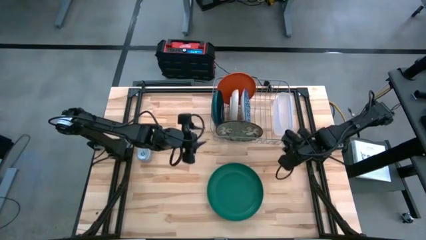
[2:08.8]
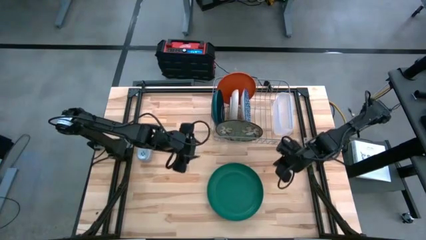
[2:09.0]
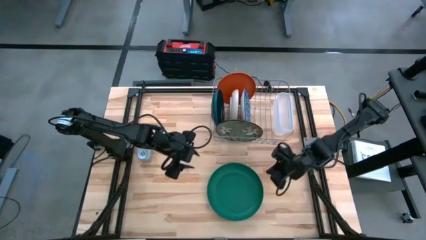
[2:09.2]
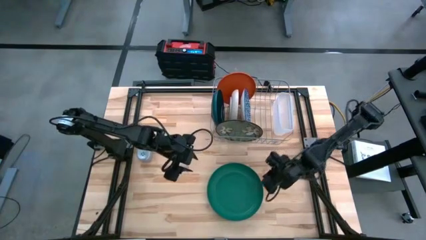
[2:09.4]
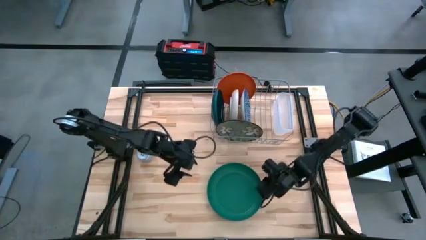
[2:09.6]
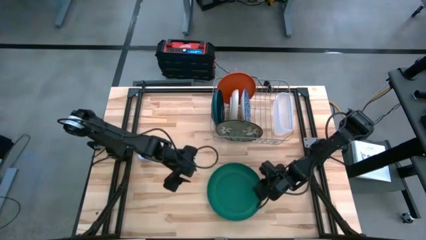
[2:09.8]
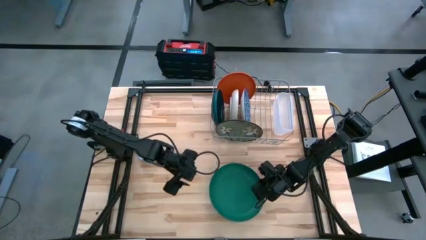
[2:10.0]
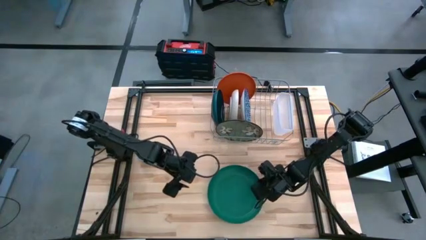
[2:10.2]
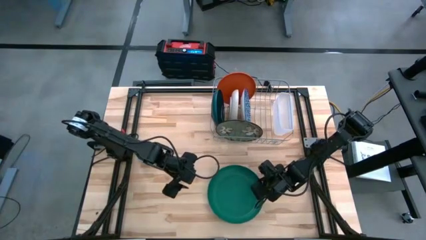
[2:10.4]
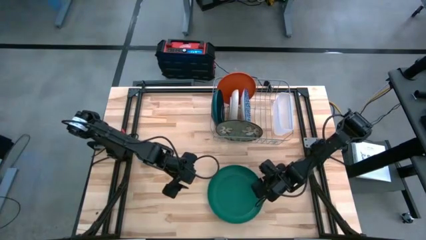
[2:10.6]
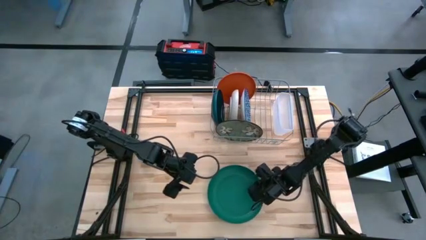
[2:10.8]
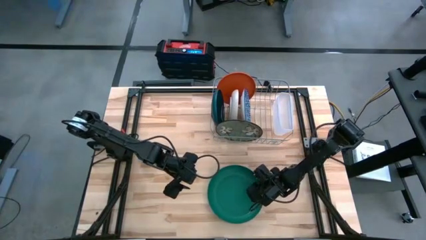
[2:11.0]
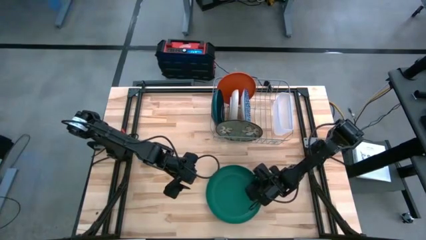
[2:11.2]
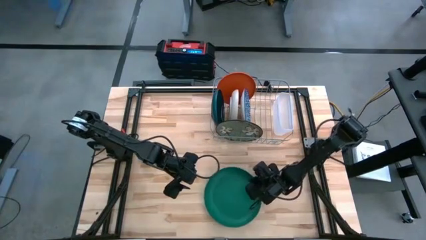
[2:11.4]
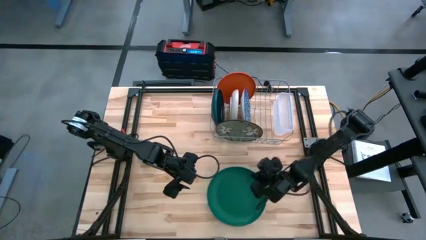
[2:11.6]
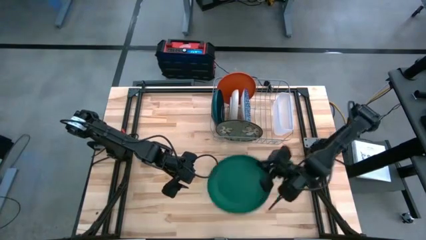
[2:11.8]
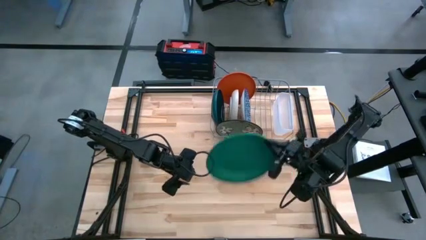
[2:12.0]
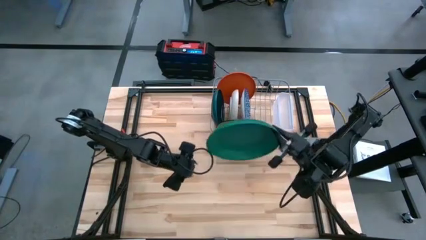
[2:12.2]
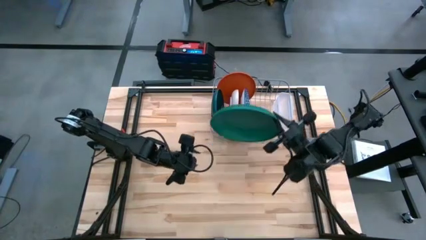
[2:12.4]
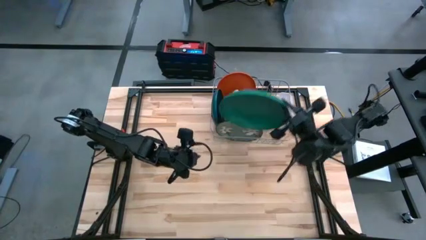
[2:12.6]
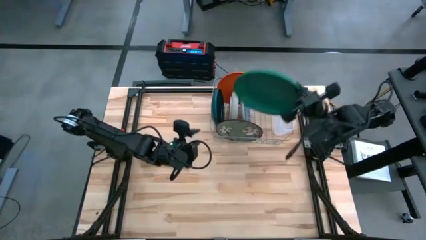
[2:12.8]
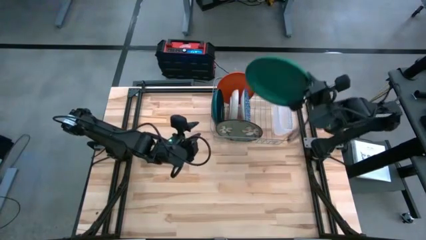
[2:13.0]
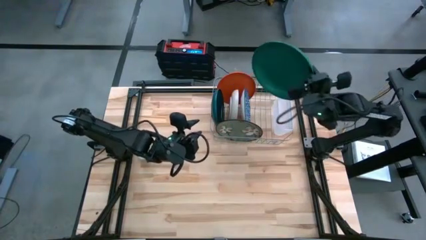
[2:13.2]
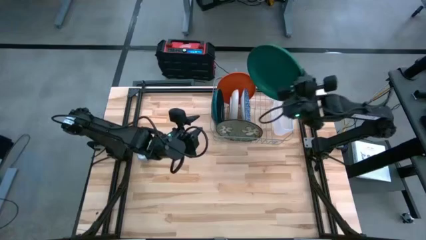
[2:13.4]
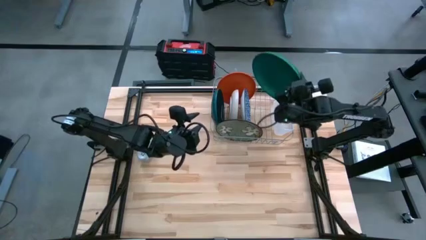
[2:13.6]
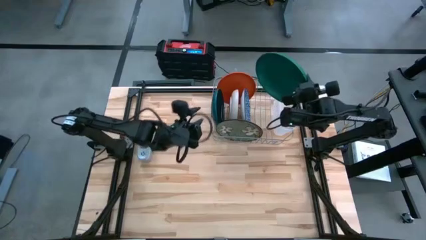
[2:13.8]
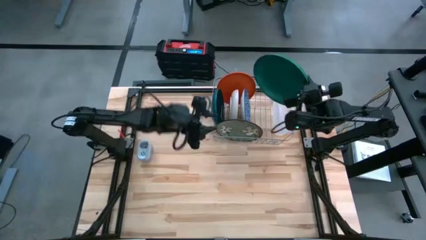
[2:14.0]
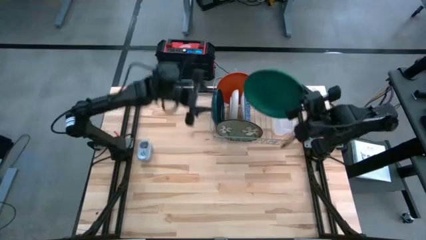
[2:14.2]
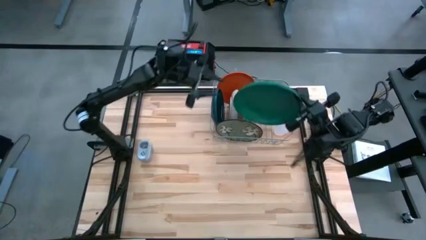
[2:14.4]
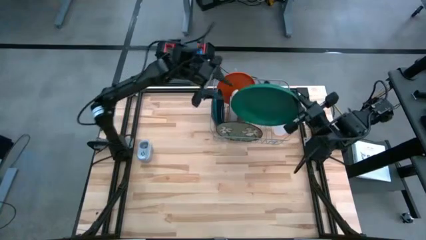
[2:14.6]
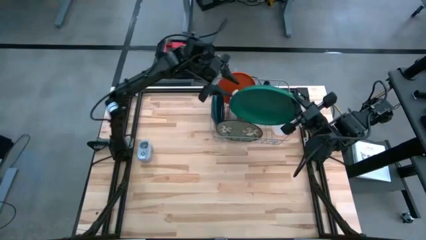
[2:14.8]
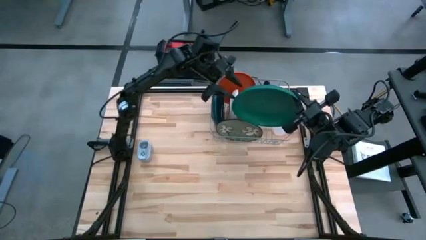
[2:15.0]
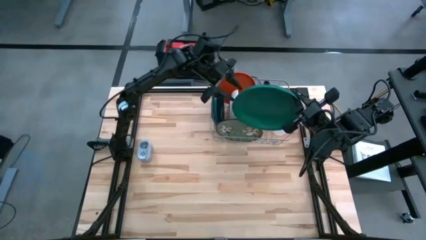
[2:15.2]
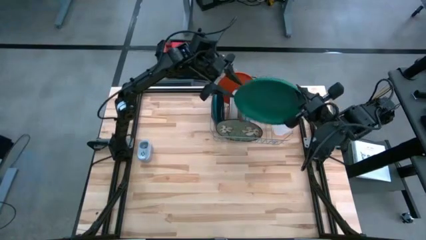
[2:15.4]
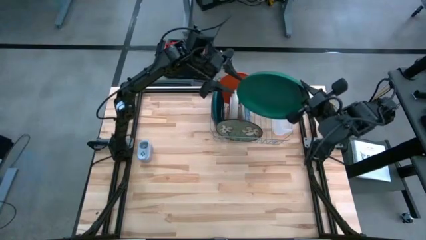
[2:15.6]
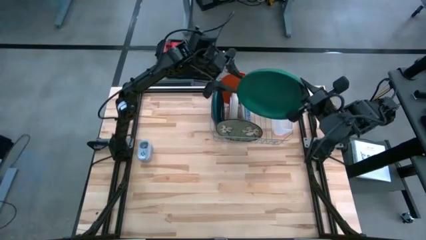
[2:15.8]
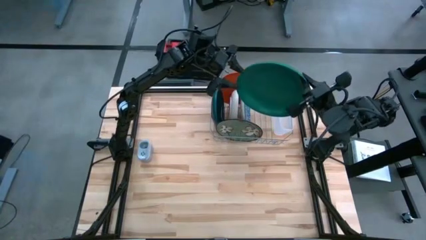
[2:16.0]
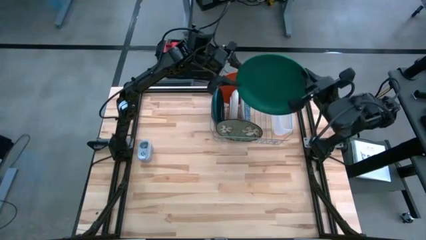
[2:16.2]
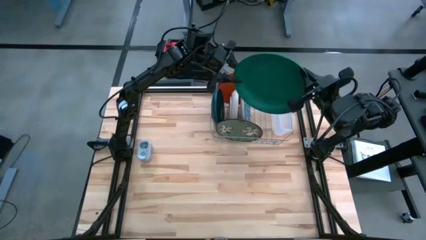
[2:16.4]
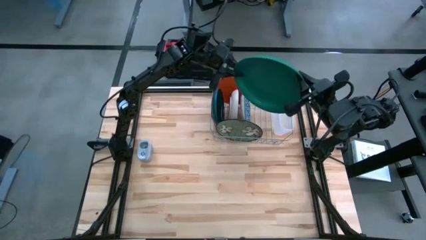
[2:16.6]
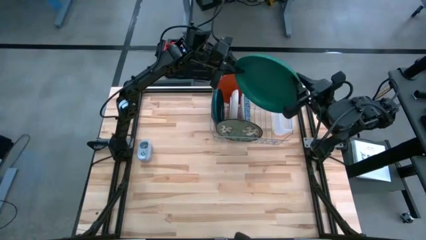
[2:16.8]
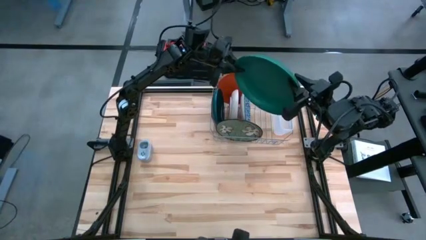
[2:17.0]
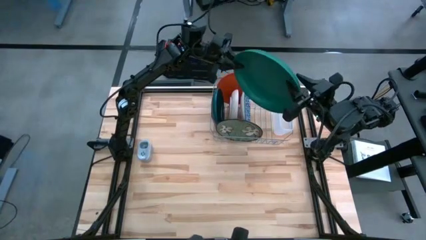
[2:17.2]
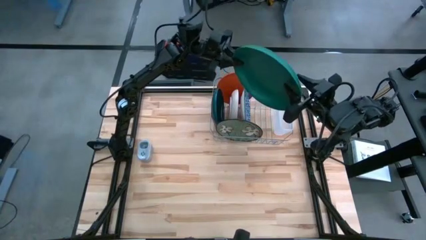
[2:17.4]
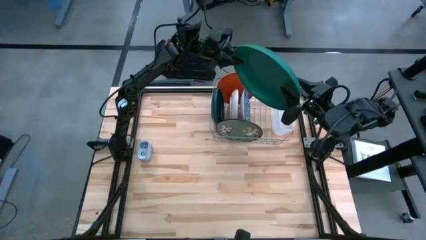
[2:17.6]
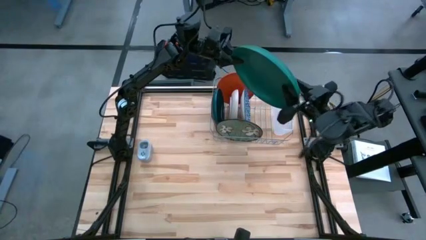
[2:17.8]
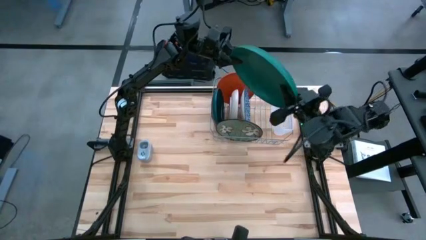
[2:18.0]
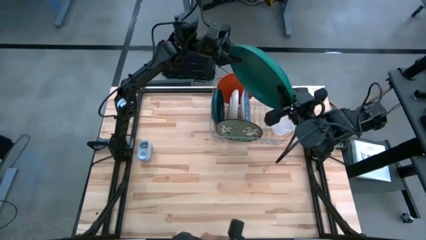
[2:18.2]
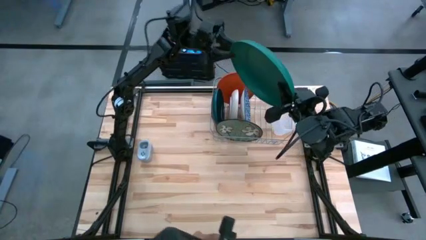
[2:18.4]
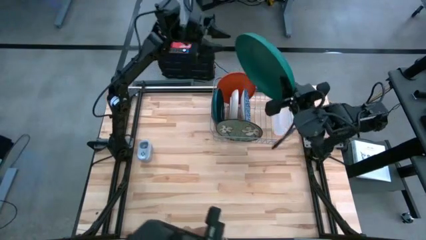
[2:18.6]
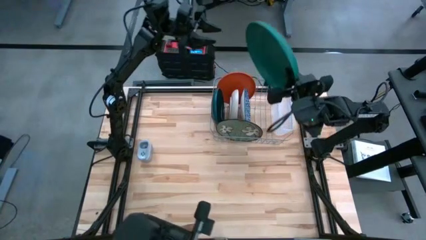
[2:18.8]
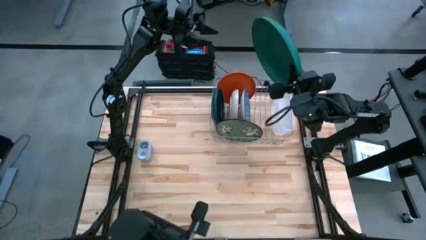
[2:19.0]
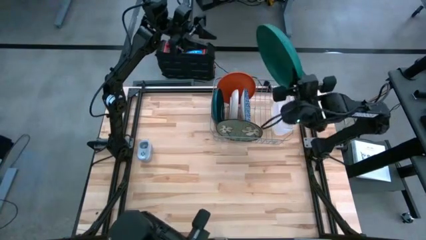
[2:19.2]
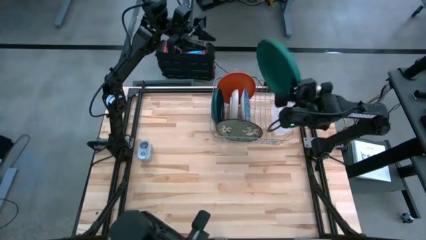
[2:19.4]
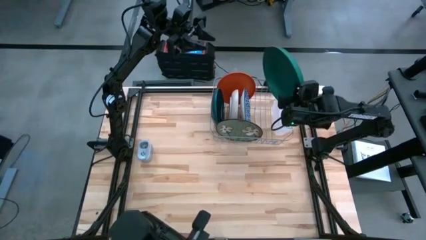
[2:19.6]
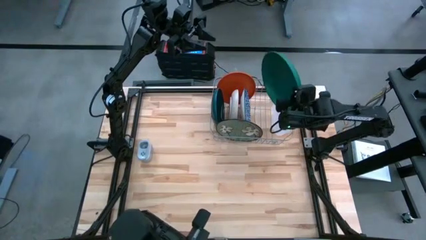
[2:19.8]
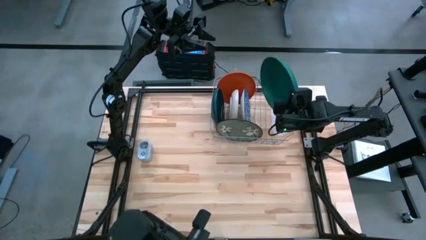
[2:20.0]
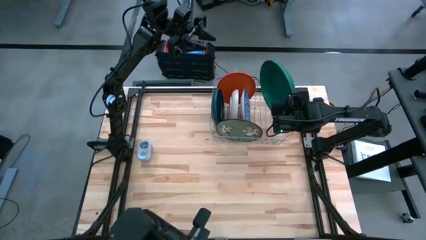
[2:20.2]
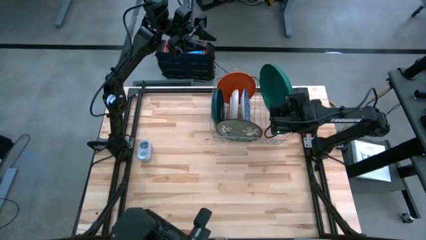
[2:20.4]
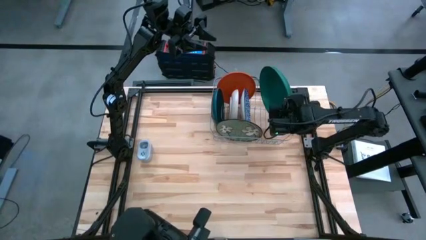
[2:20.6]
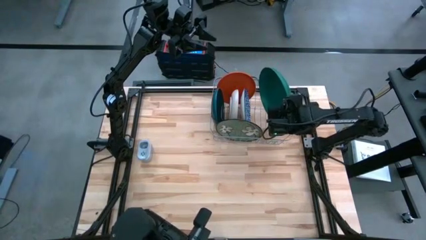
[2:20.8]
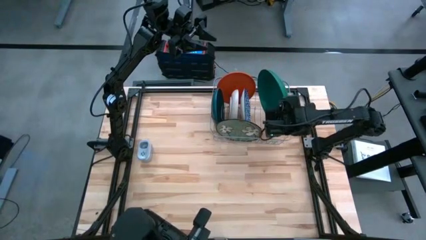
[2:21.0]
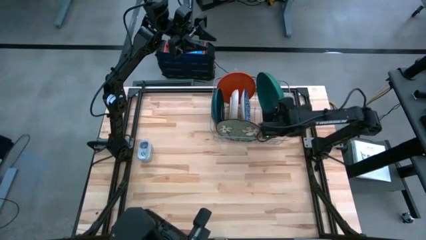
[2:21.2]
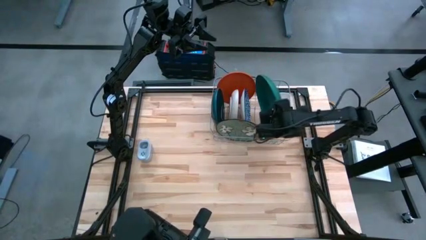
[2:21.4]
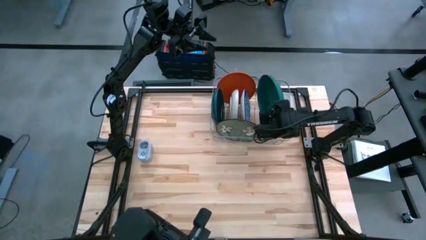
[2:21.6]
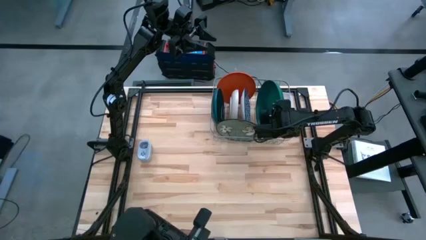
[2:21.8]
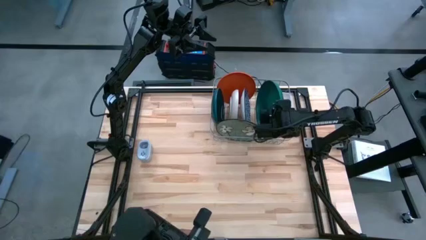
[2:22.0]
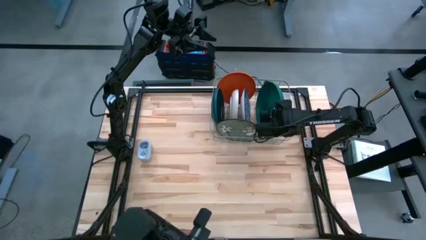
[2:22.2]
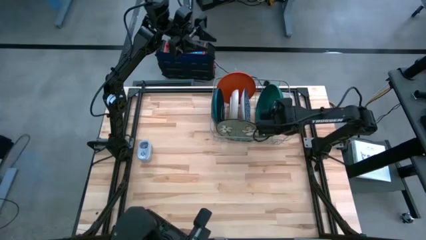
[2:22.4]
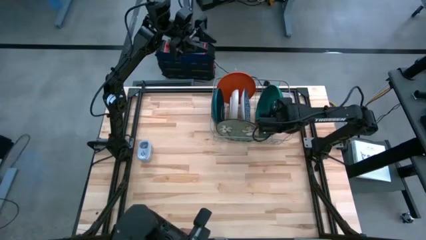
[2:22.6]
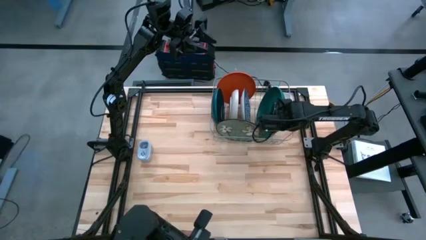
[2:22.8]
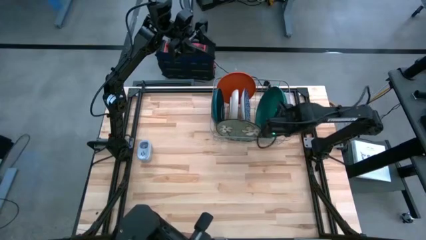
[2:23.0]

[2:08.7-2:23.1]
Task: Sort dishes
Put the green plate in the dish rack

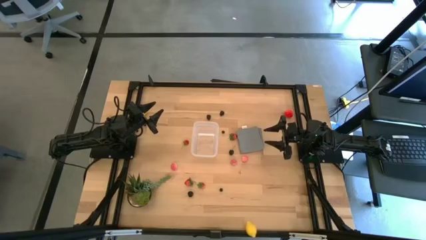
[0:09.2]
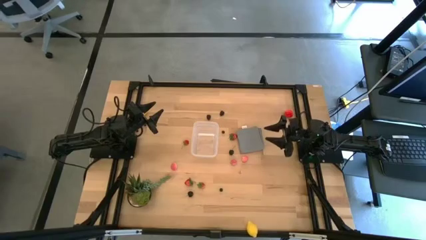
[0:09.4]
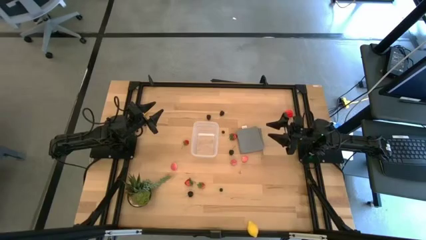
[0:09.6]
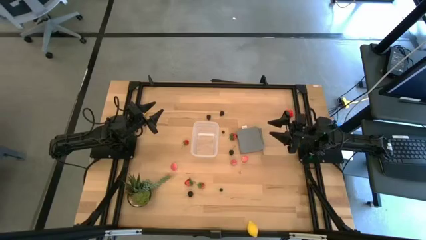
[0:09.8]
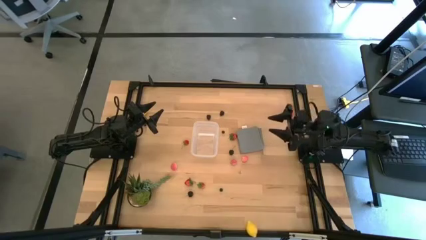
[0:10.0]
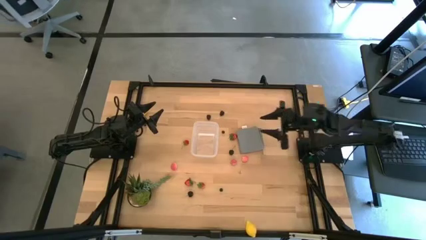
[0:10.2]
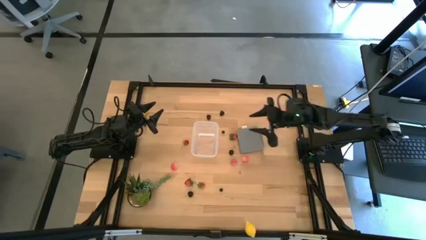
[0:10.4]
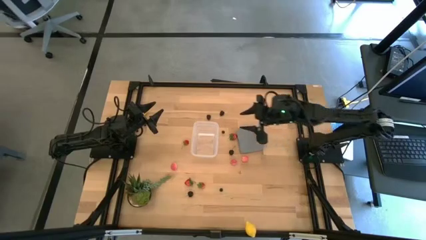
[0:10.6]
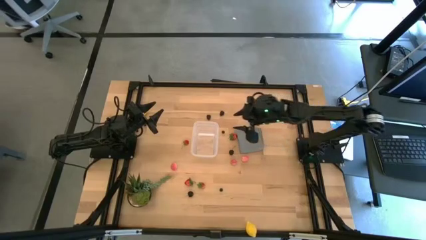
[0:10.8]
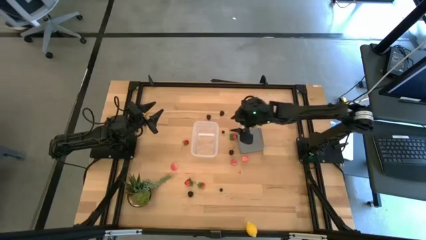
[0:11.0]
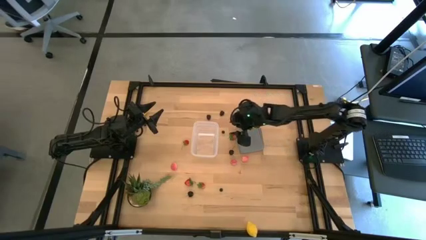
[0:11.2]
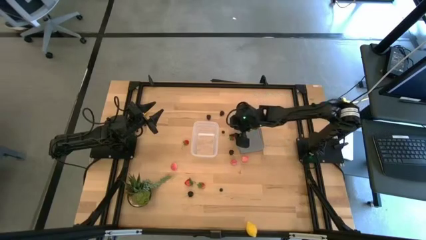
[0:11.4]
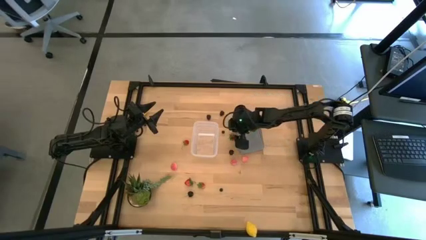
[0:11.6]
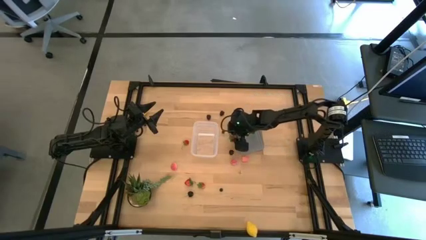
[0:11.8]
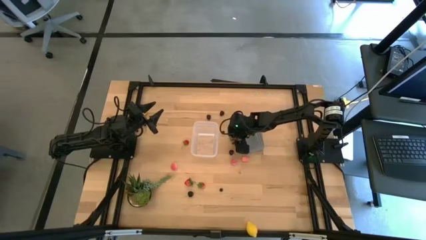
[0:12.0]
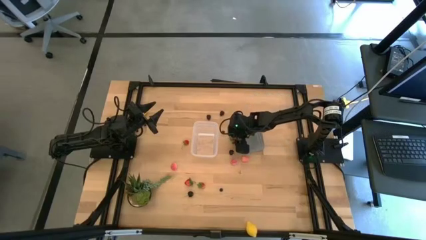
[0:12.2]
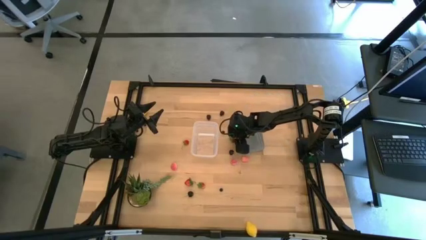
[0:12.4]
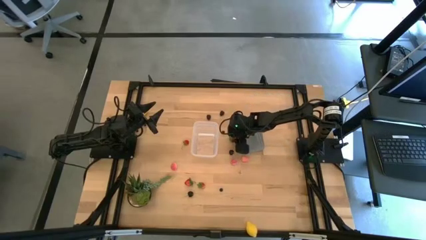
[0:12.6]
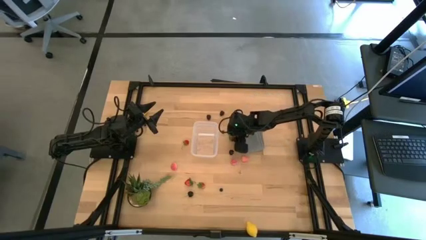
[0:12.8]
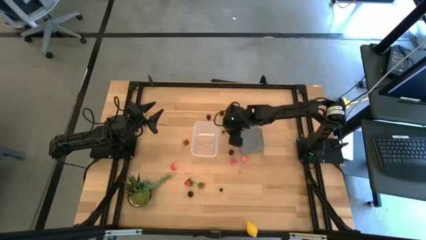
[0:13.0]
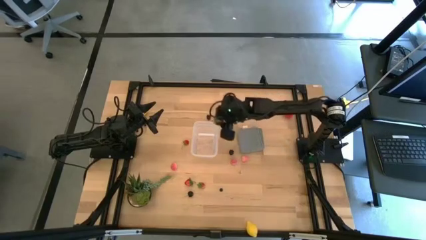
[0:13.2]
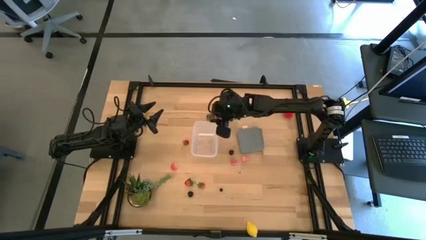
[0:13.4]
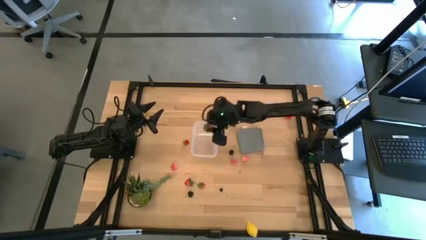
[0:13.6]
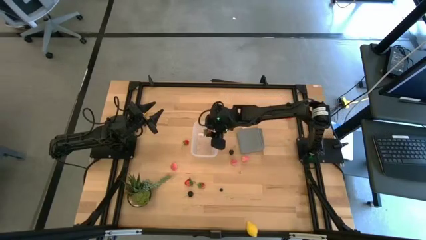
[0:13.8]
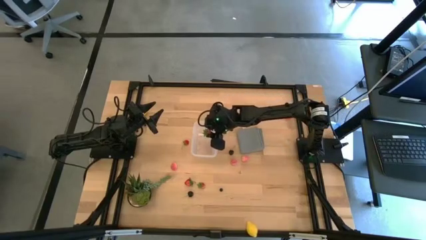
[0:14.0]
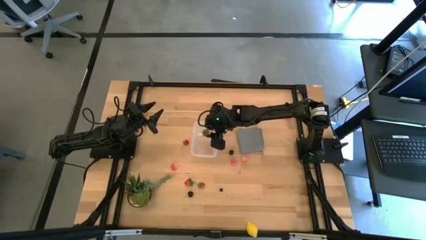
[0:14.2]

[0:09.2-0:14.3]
Task: Pick and placing Produce into tupperware
Put the strawberry into the transparent bin
